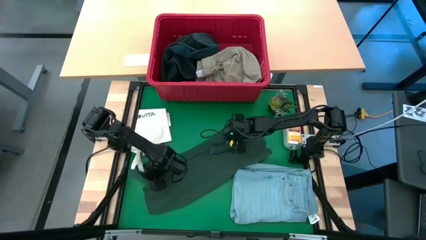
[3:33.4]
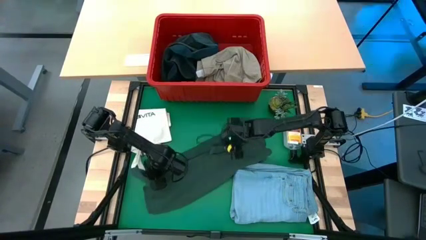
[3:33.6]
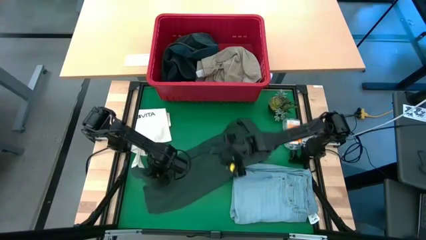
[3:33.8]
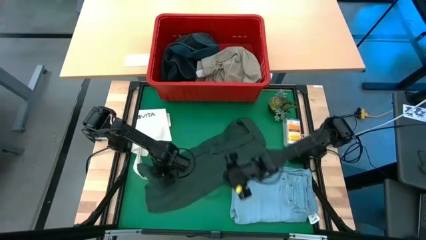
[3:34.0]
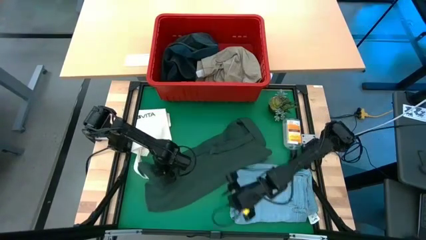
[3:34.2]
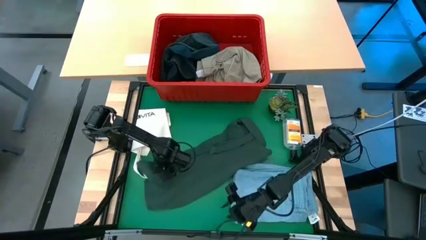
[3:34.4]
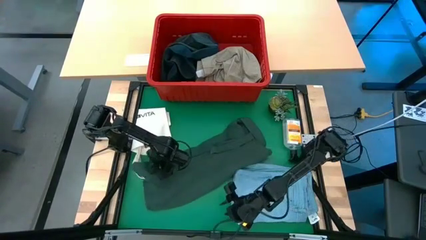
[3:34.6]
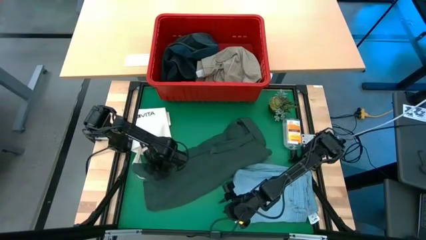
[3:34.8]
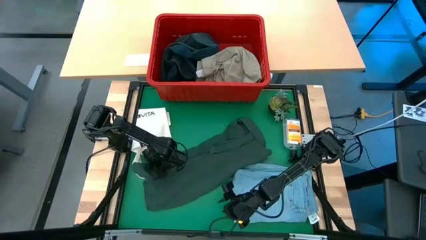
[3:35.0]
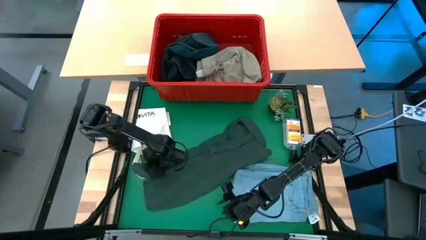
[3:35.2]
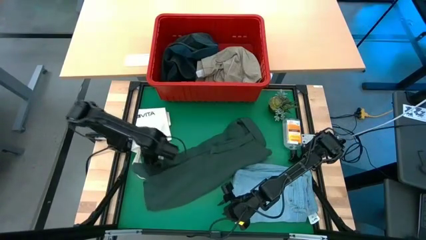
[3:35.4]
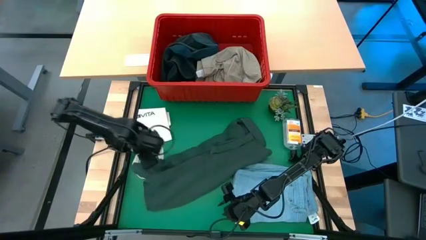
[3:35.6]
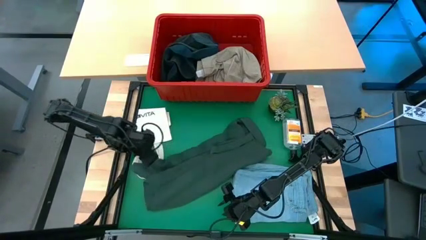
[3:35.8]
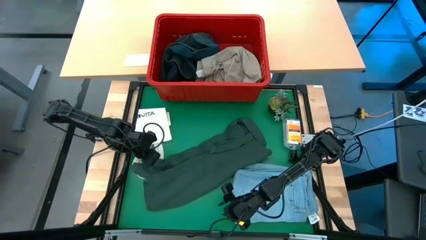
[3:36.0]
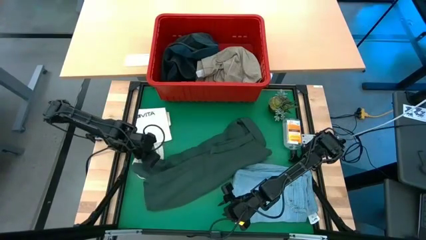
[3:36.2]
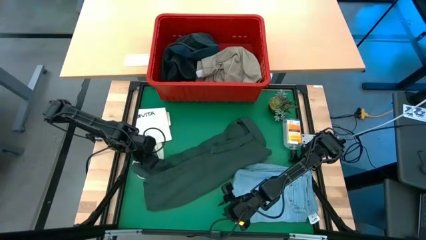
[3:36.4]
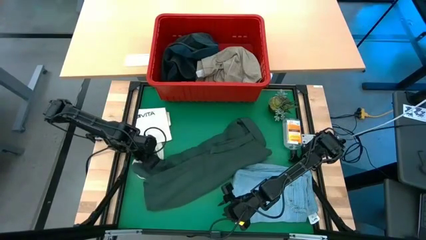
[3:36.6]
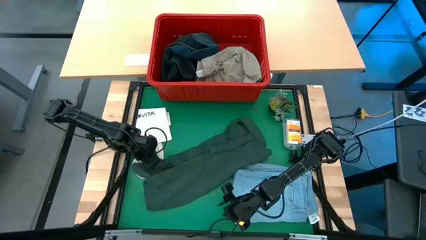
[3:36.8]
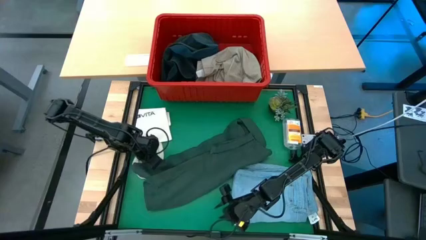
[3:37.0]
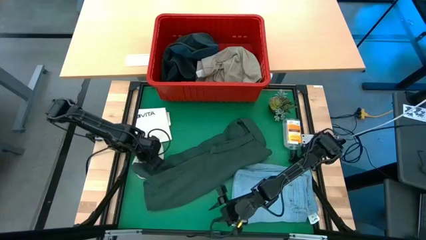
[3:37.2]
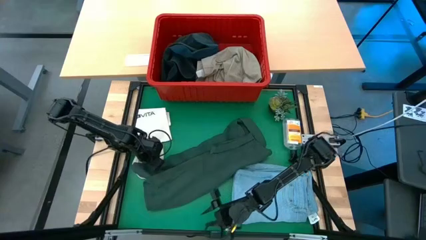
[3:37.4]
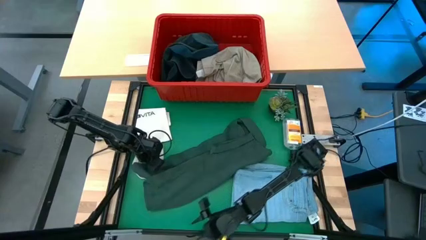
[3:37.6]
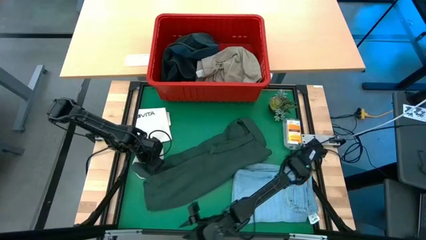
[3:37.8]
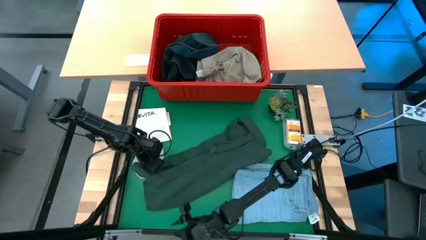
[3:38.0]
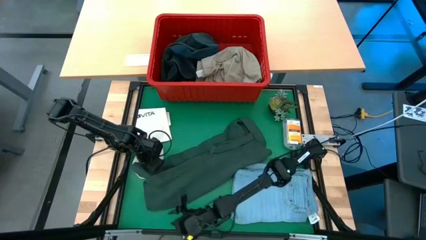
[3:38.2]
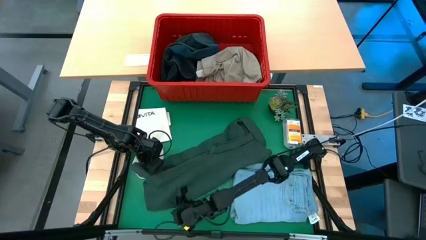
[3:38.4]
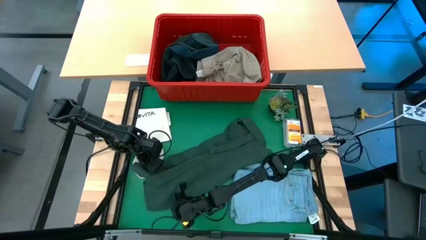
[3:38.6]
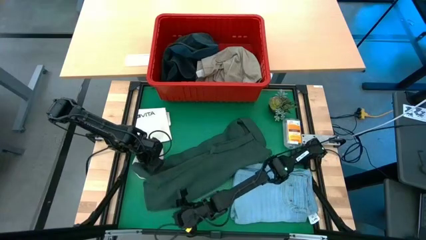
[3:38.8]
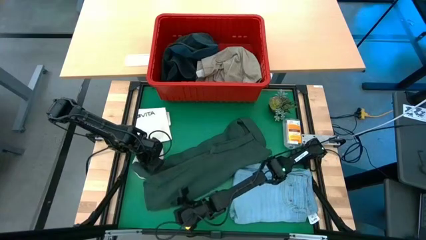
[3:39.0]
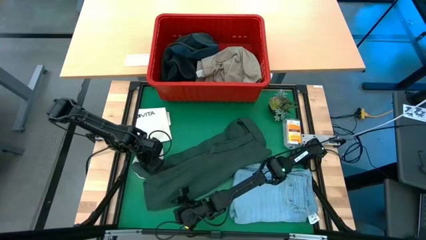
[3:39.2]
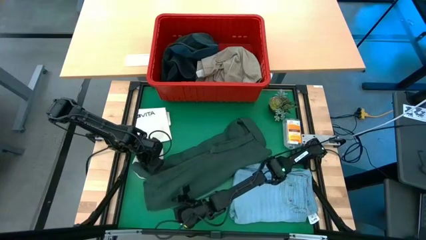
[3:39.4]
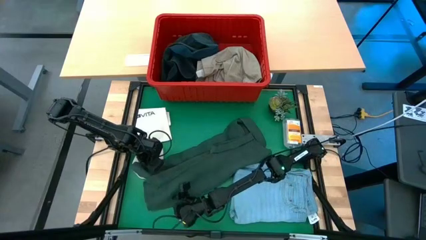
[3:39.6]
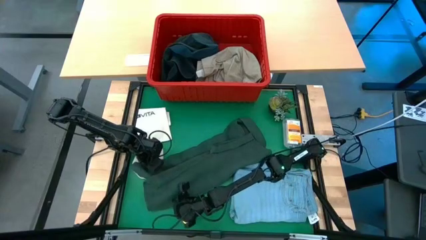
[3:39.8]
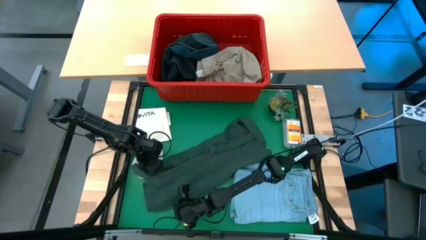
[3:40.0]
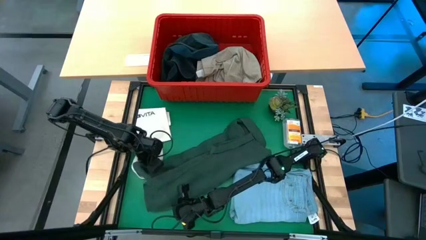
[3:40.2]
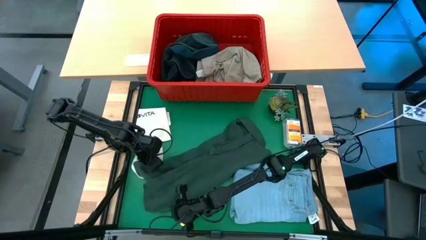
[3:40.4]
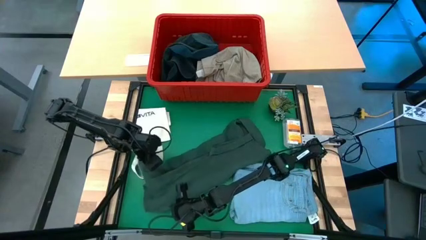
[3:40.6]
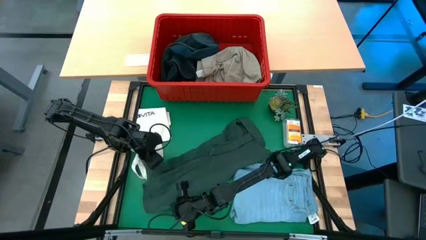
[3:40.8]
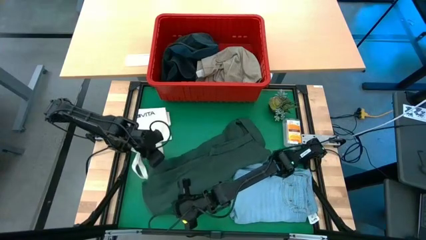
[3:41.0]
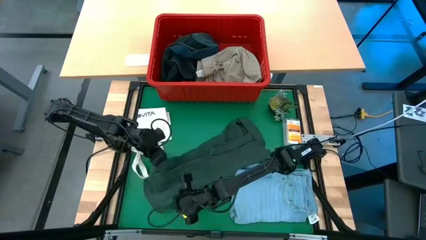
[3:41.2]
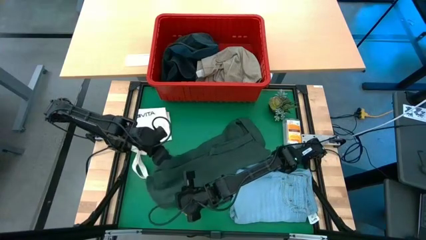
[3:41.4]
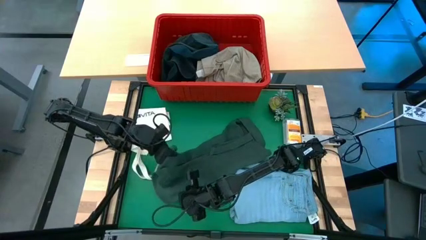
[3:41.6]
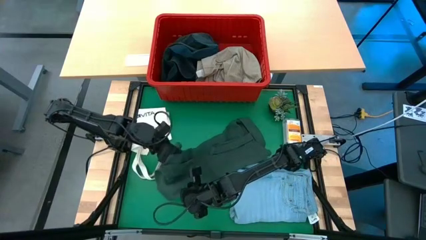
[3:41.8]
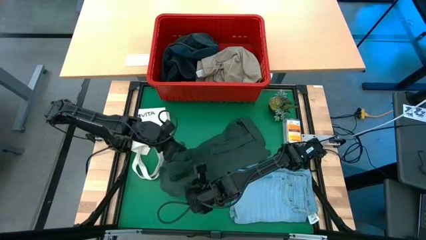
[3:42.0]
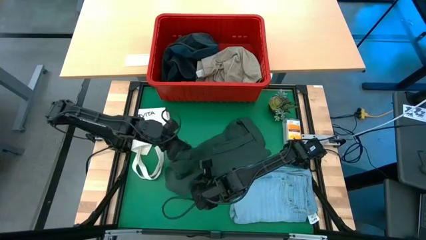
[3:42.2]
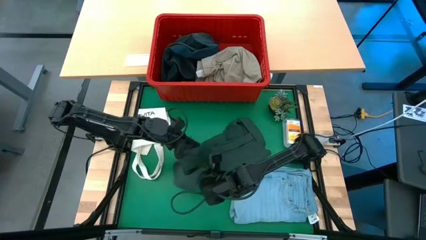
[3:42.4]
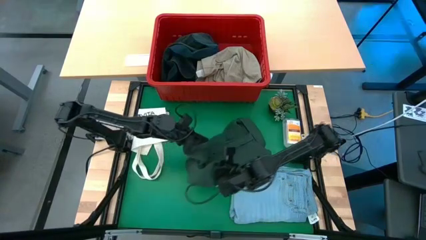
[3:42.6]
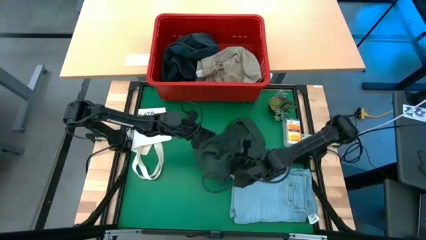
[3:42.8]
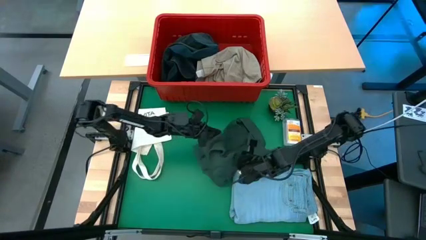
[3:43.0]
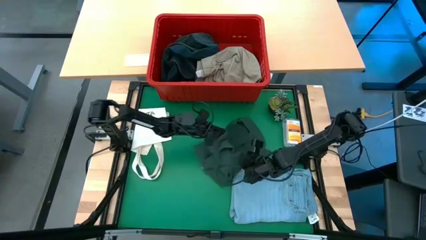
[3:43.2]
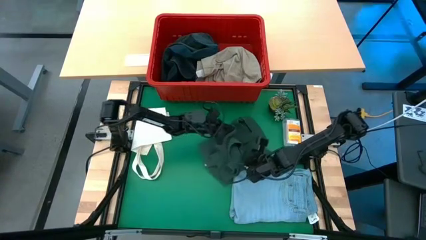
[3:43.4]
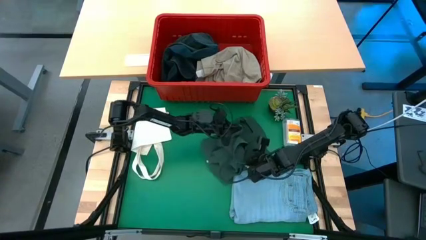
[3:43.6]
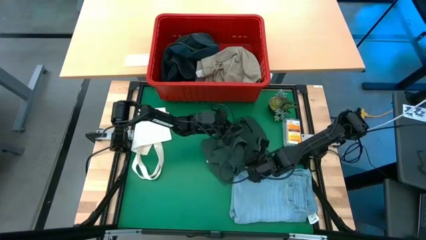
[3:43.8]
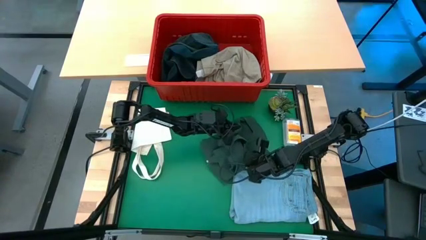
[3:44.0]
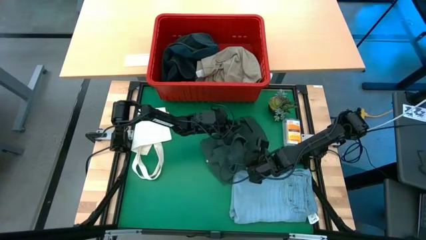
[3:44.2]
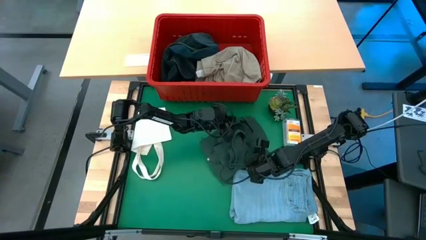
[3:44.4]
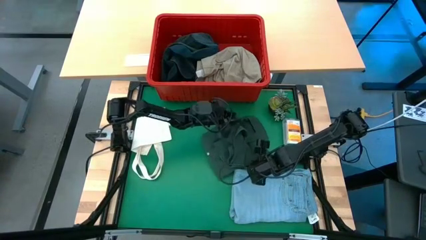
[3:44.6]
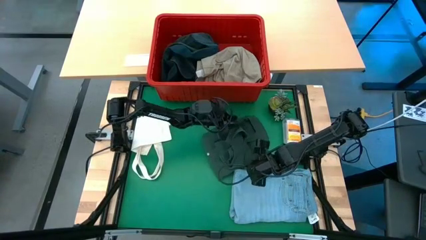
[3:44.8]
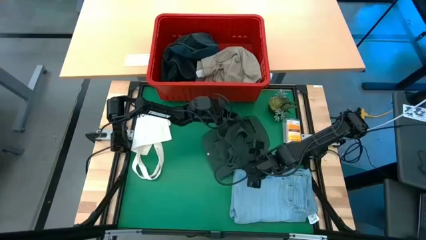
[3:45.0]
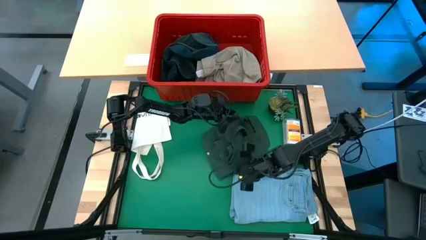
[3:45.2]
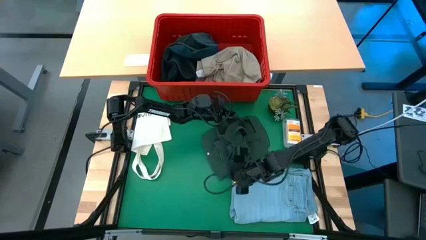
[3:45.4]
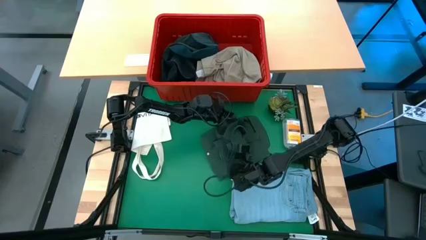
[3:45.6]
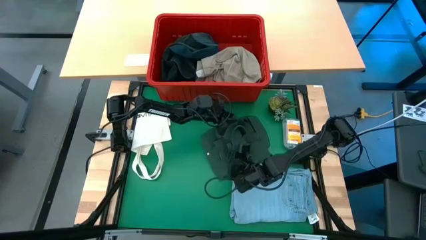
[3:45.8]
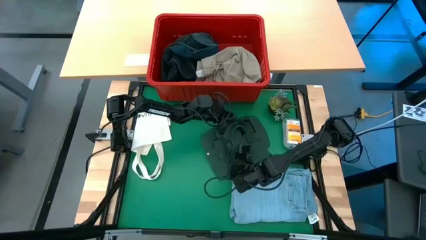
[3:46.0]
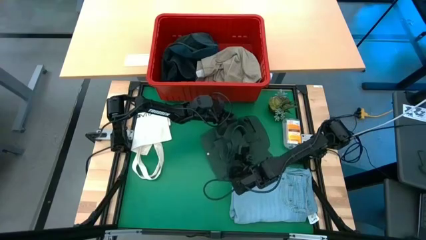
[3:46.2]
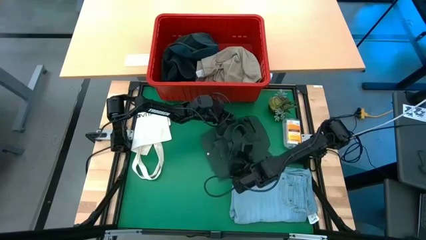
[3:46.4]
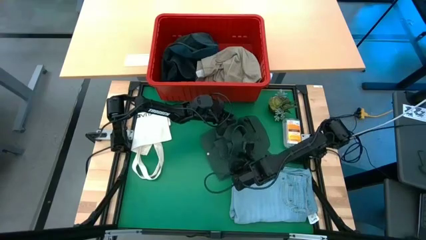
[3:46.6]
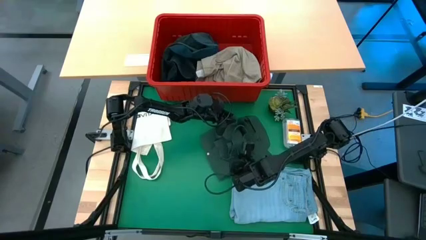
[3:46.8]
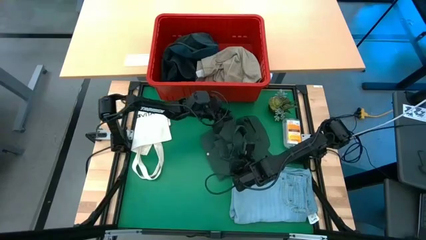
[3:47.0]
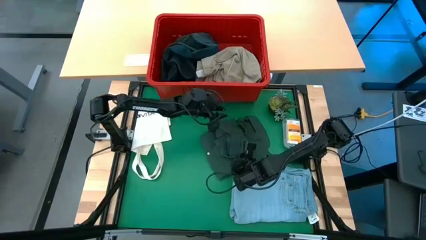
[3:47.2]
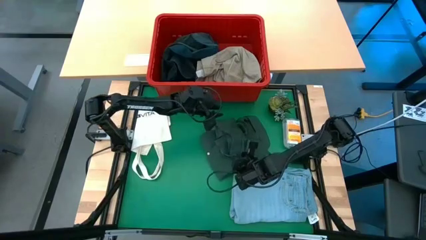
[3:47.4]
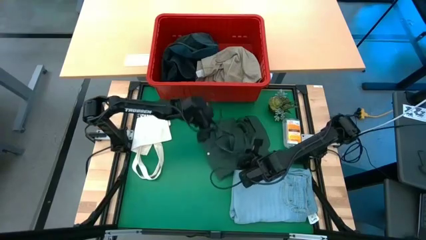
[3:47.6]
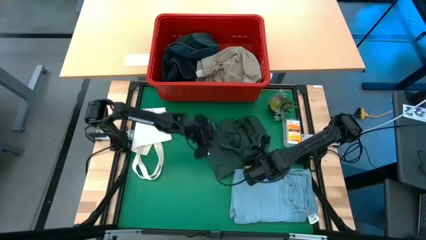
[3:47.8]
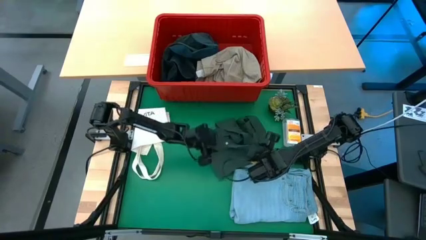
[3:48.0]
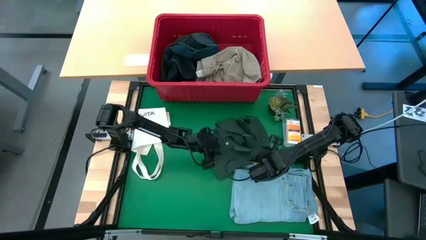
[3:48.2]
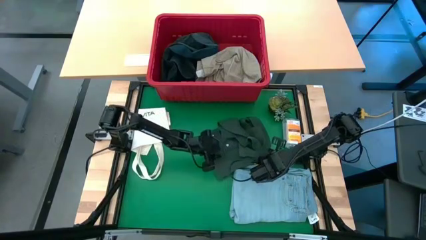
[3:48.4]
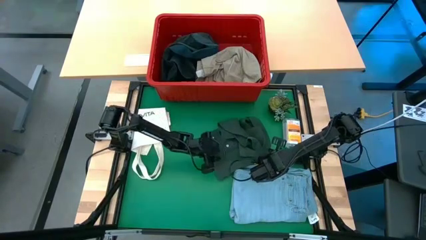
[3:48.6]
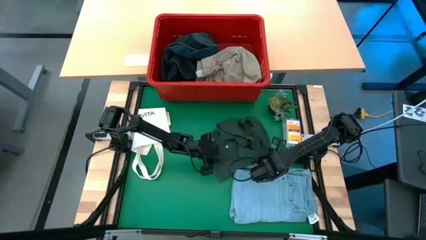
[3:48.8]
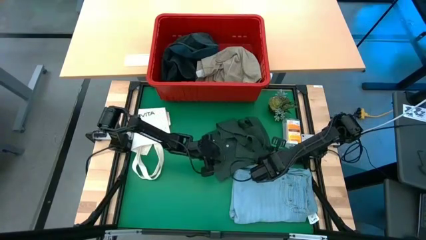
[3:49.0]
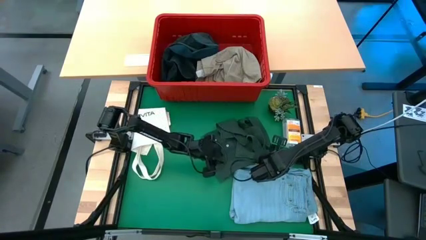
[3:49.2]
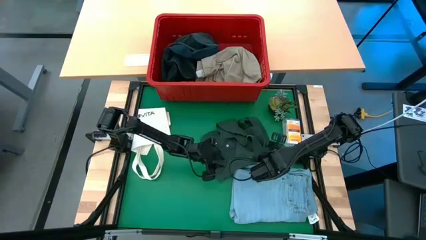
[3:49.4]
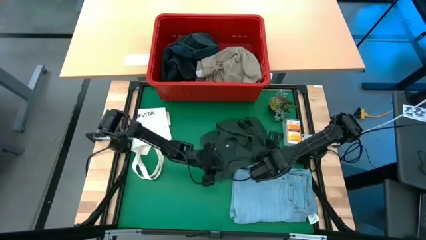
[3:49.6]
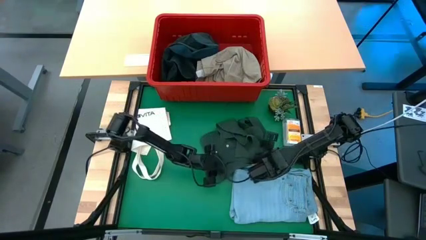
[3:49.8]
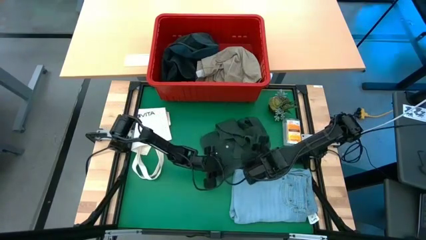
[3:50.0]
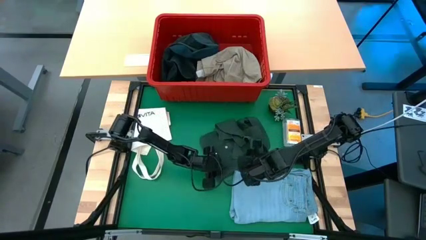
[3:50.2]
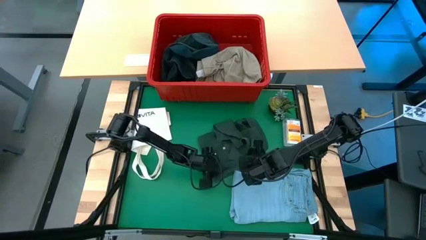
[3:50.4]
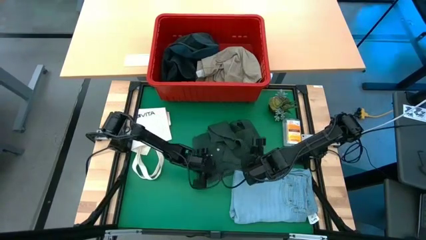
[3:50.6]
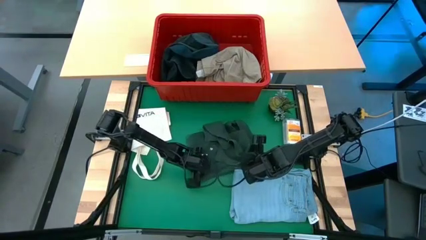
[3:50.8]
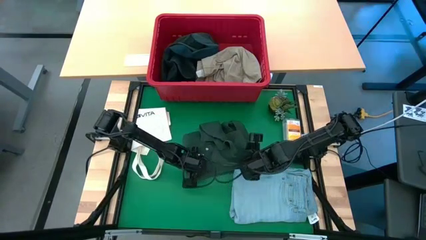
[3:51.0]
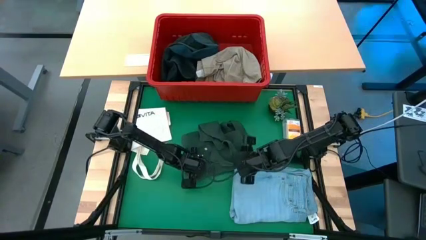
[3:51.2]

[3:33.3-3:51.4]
Task: Fold Laundry from Bin
Fold the green shirt
